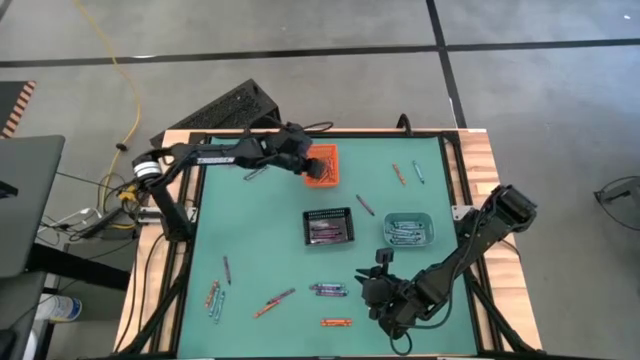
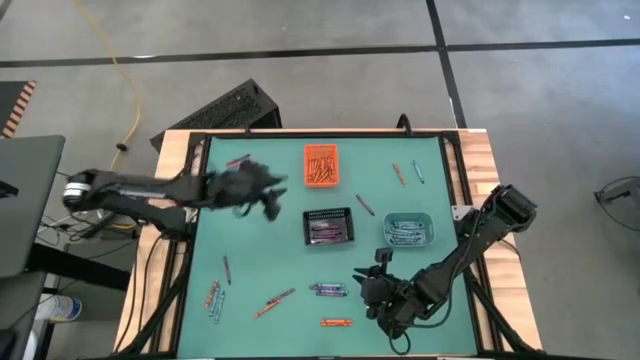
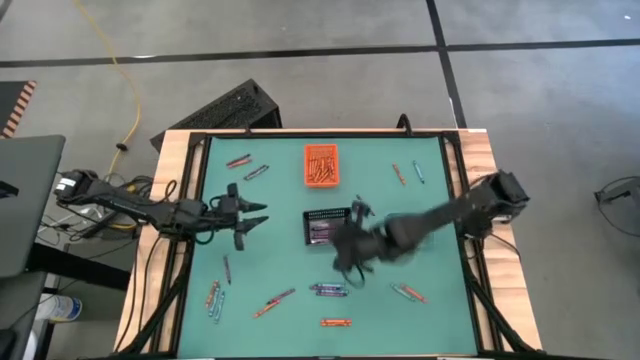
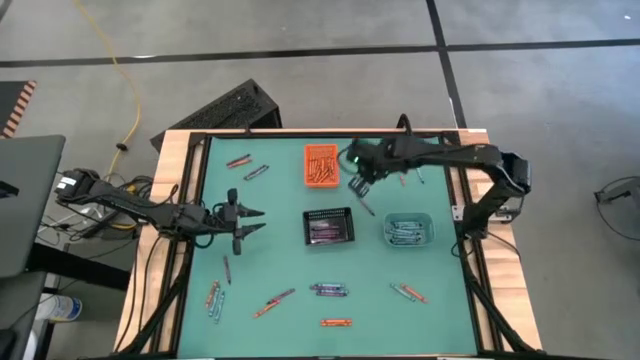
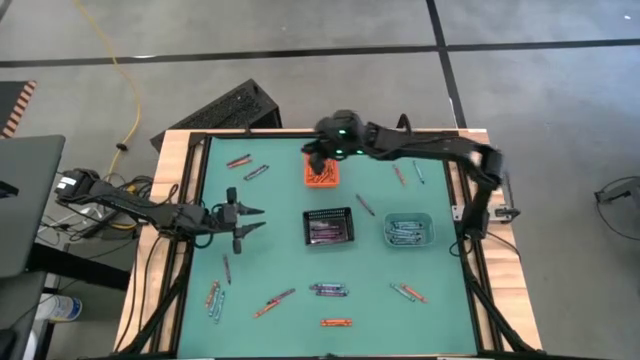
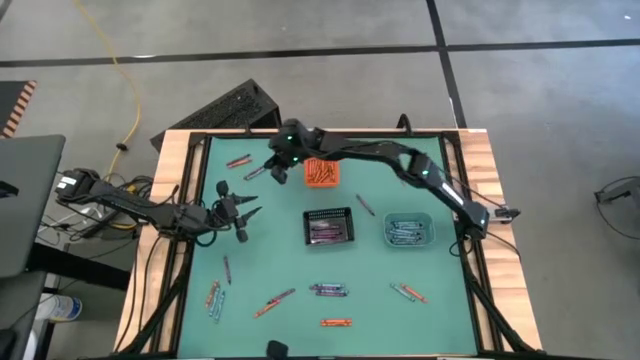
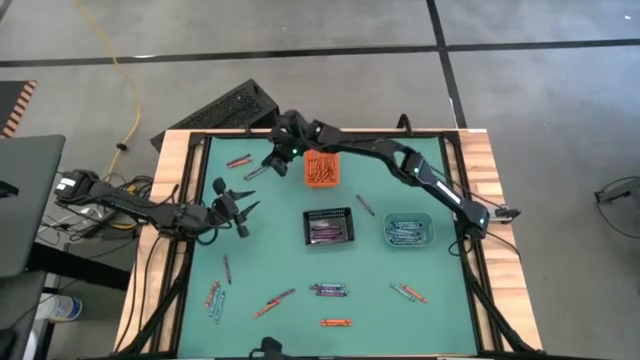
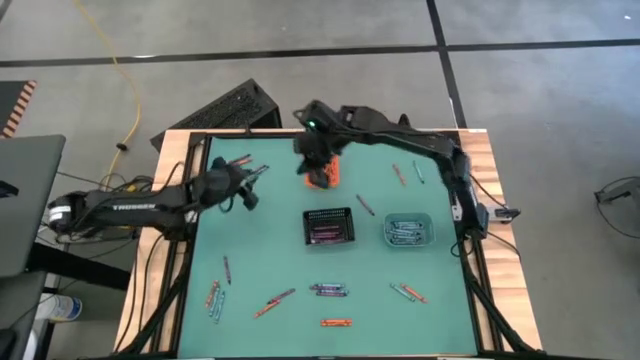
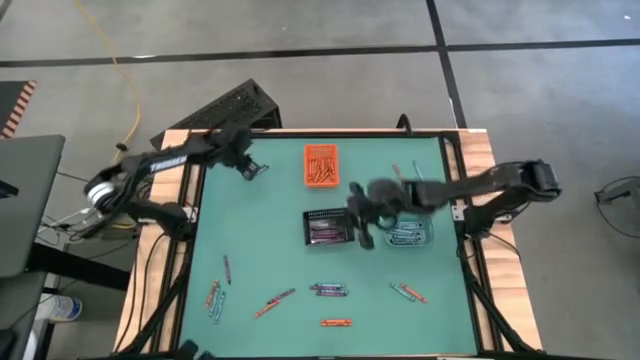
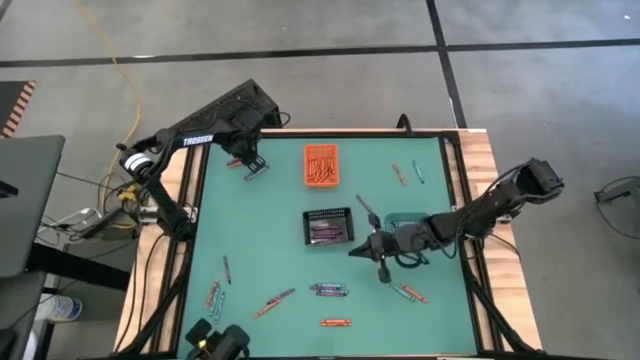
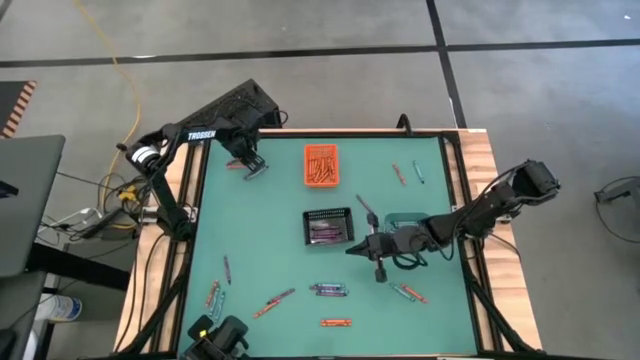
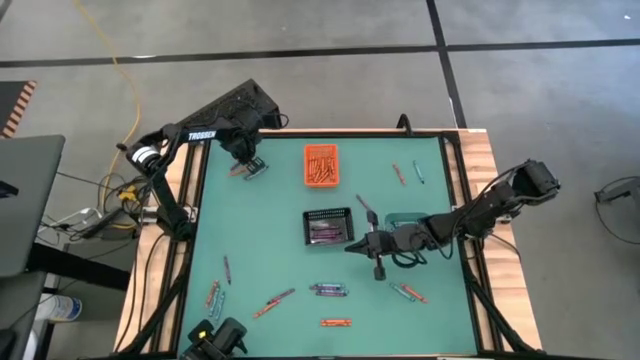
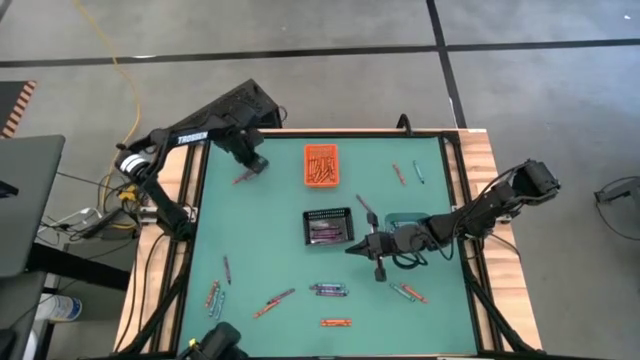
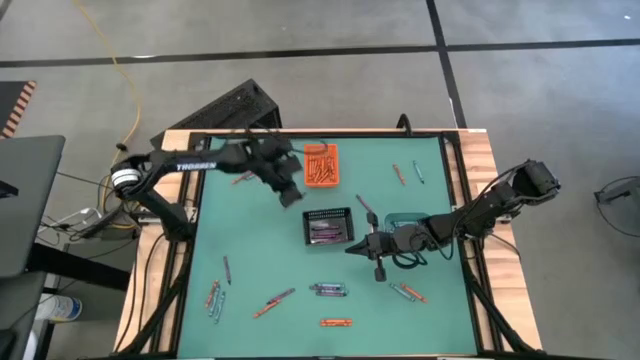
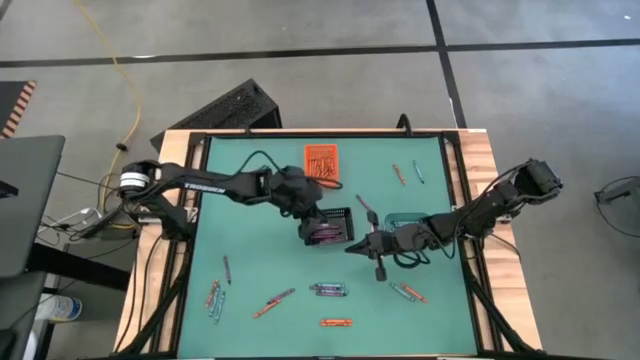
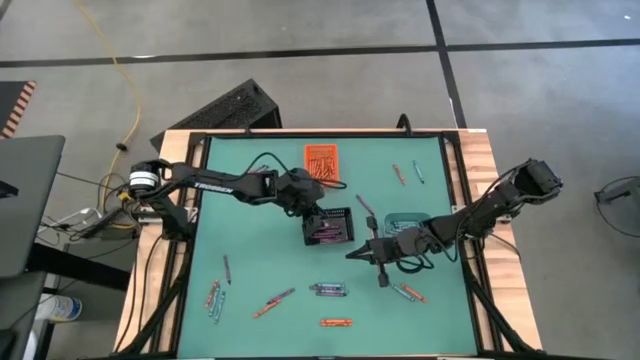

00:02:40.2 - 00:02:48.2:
Task: Sort crayons
Put the violet crayon into the black bin

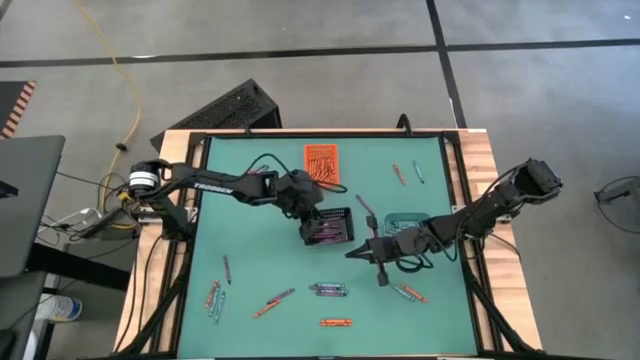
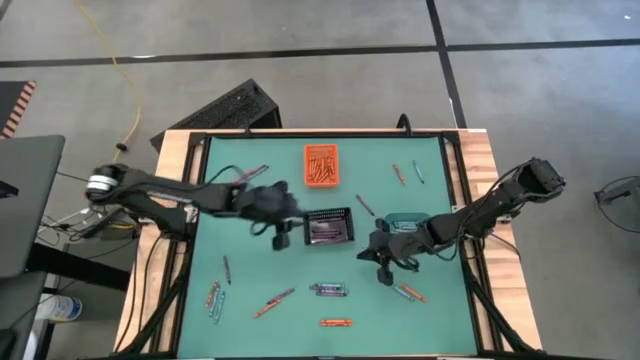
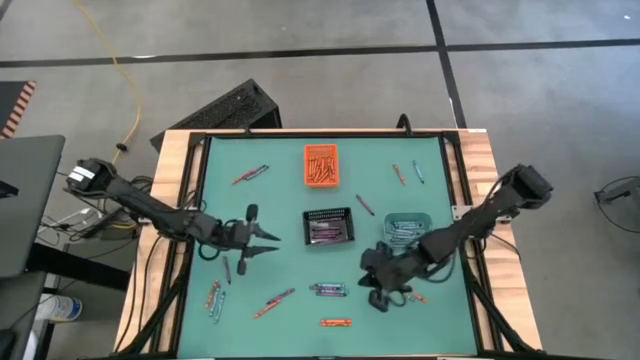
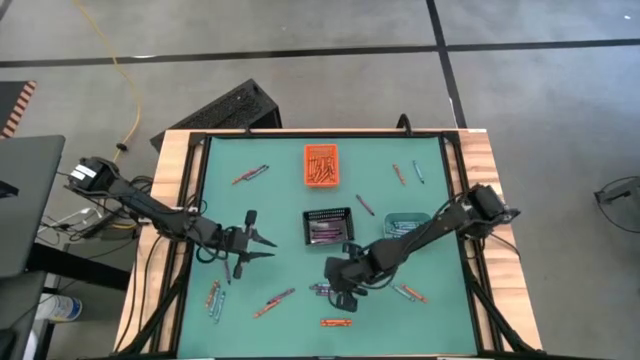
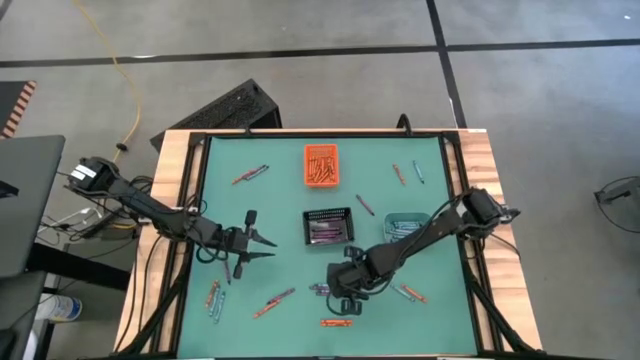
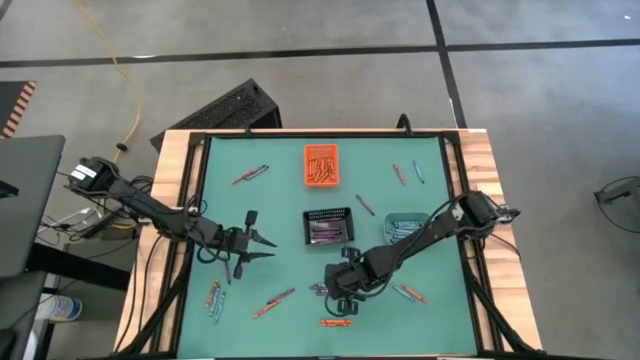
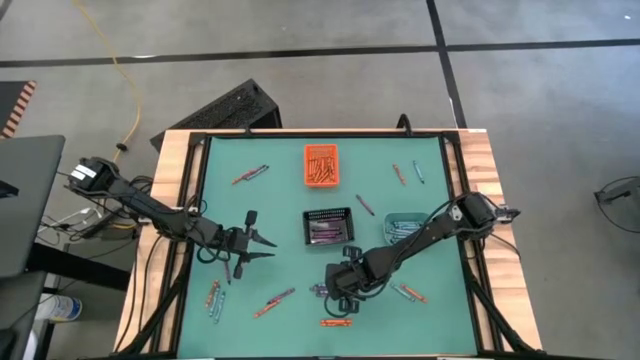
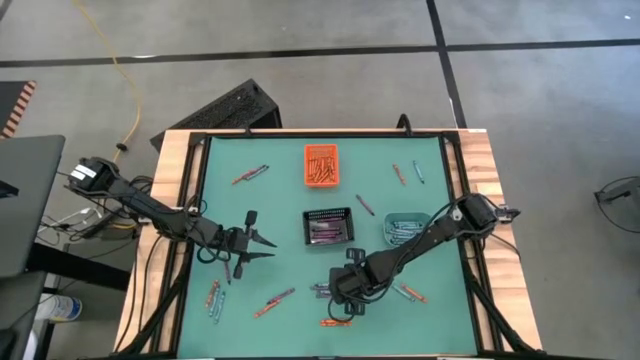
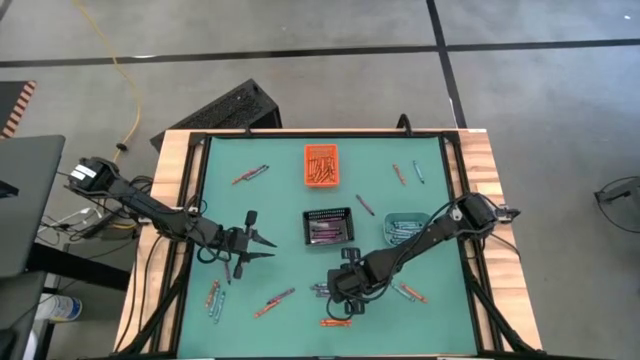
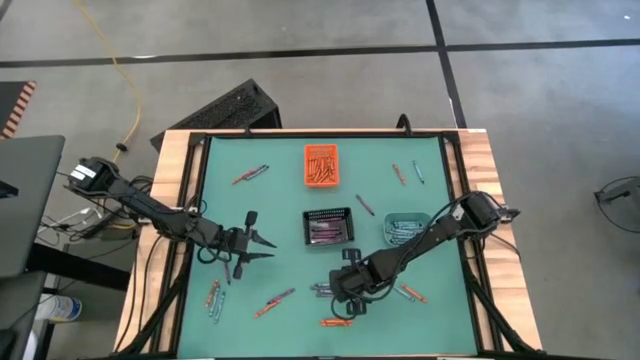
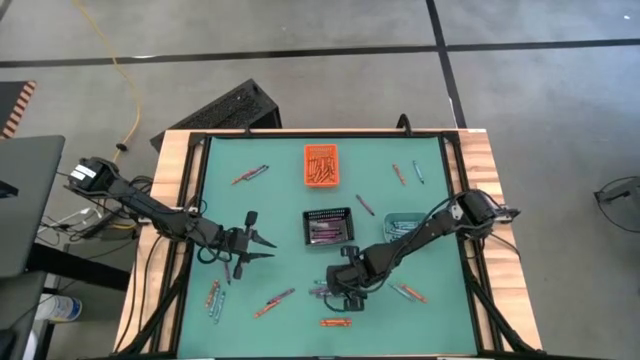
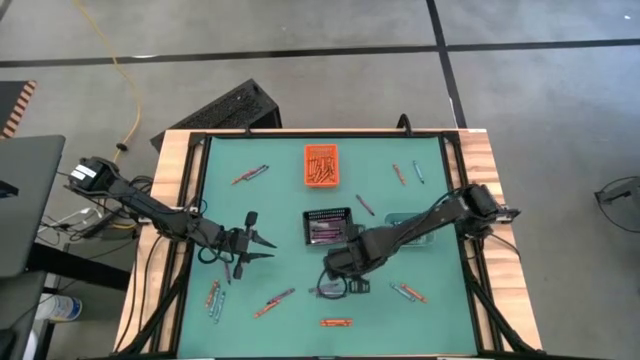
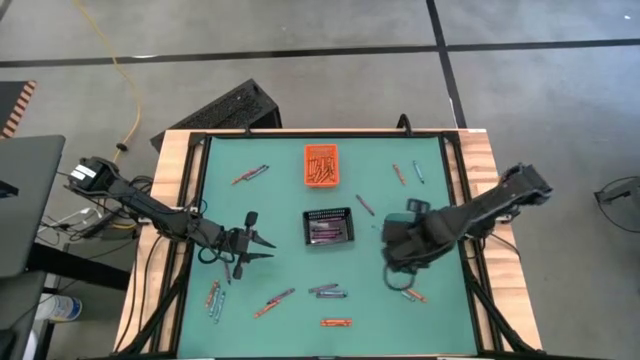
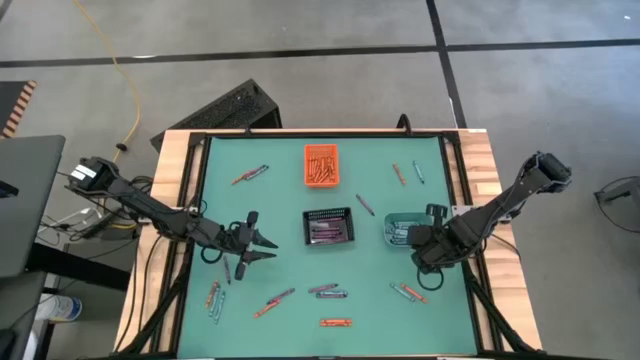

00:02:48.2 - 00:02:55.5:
Put the blue crayon into the green bin

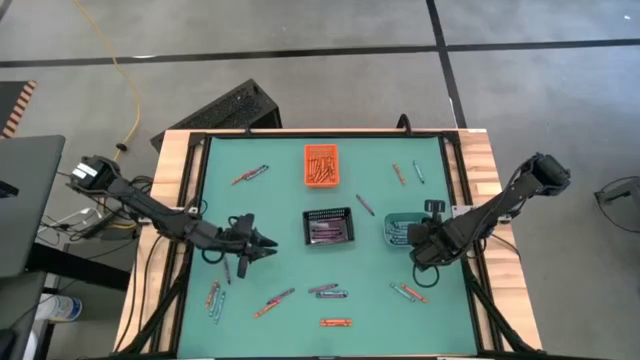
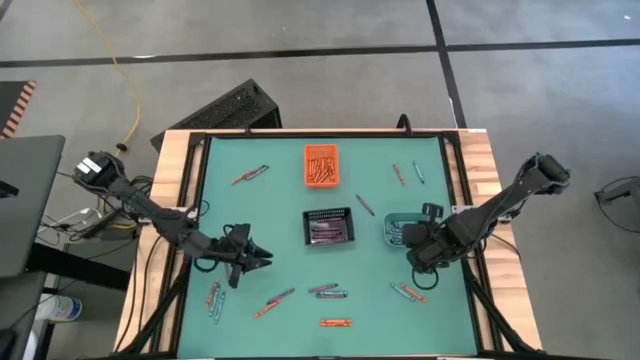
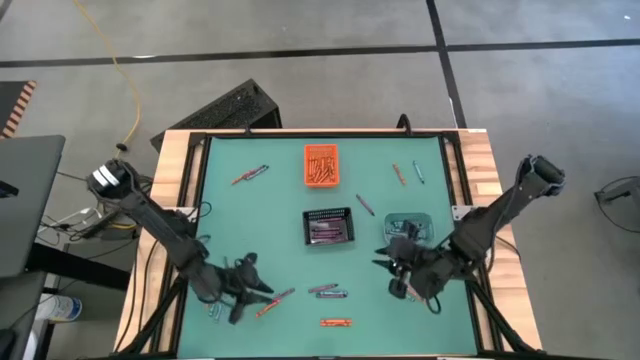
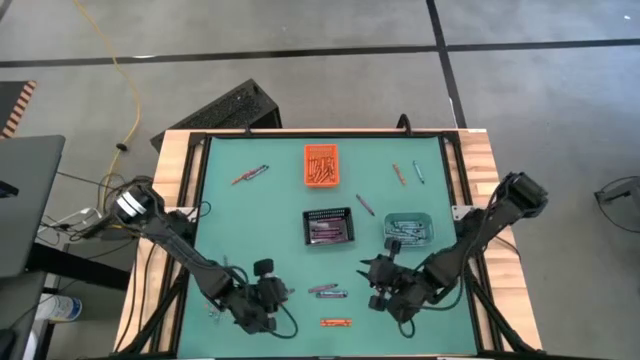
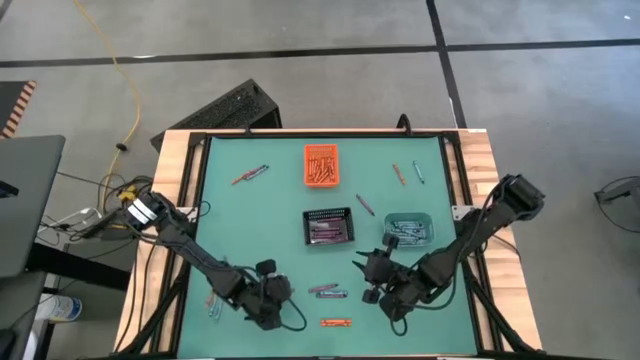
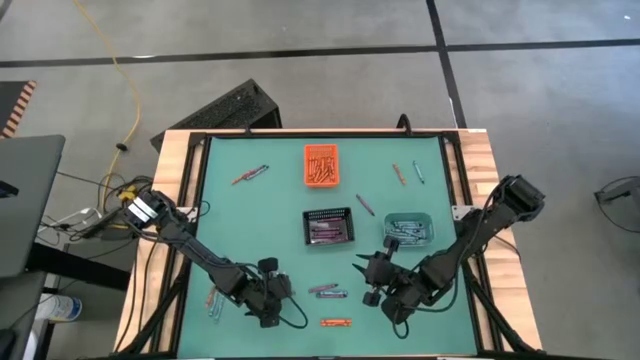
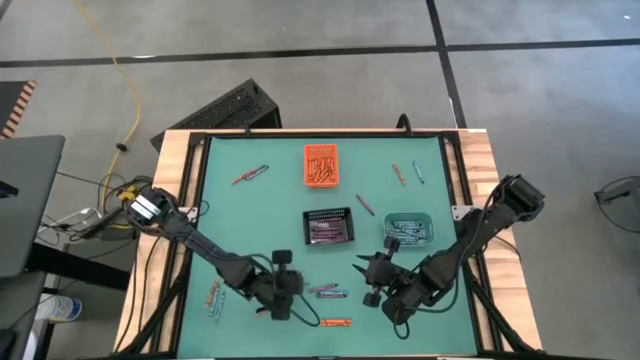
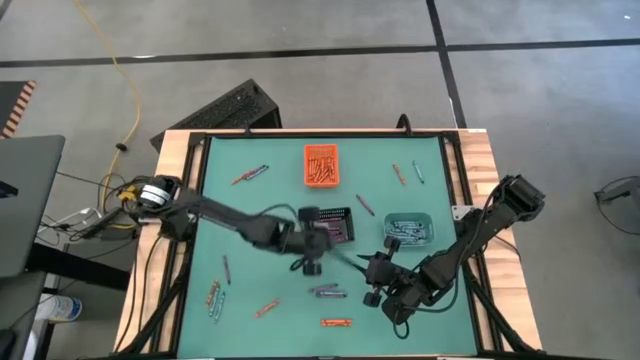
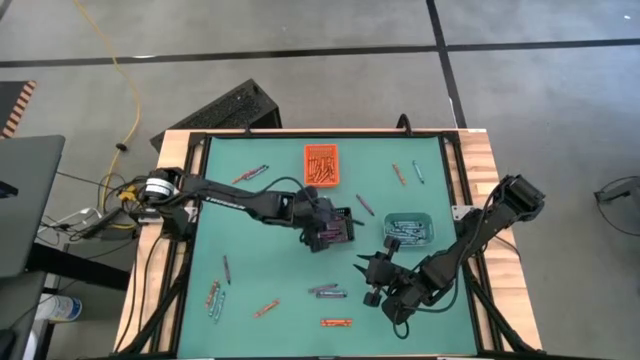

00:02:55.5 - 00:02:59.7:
Put the violet crayon into the black bin

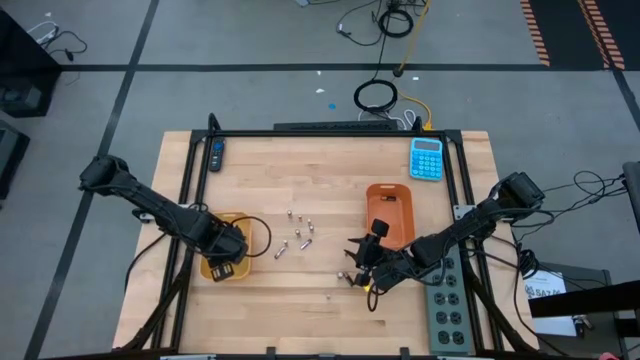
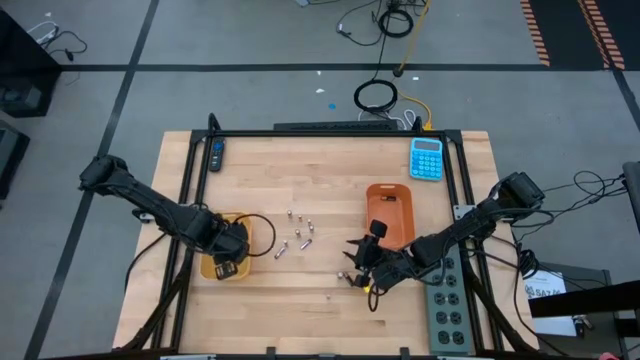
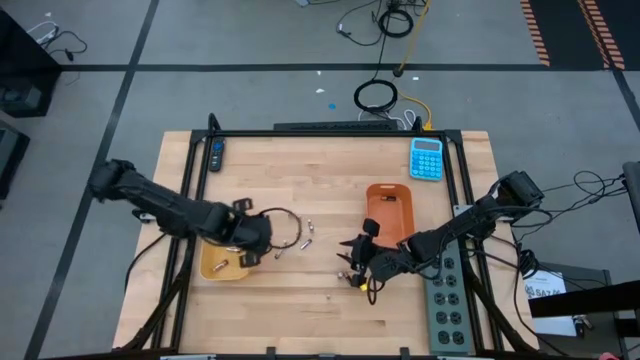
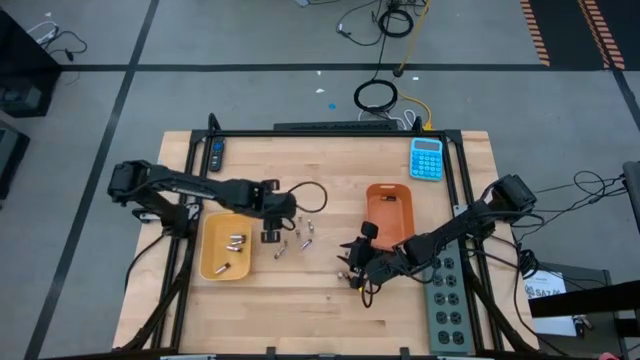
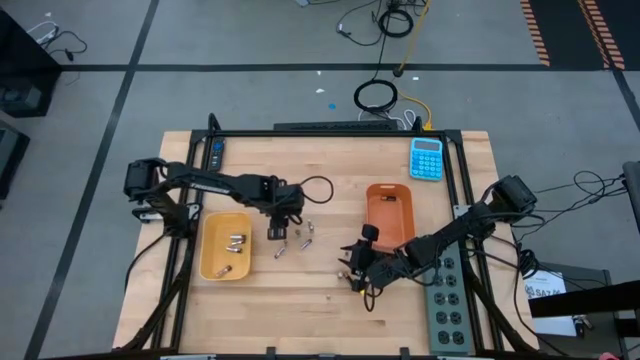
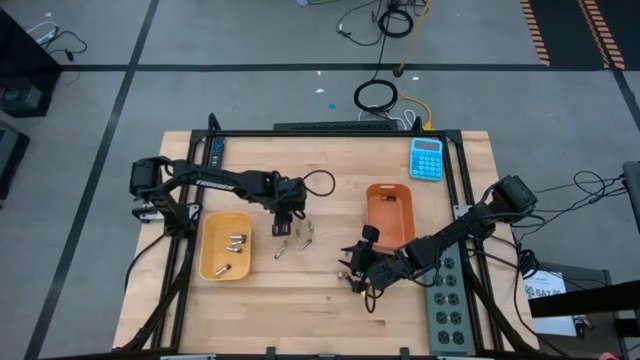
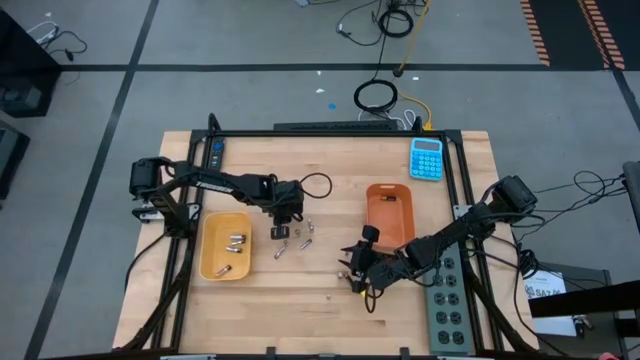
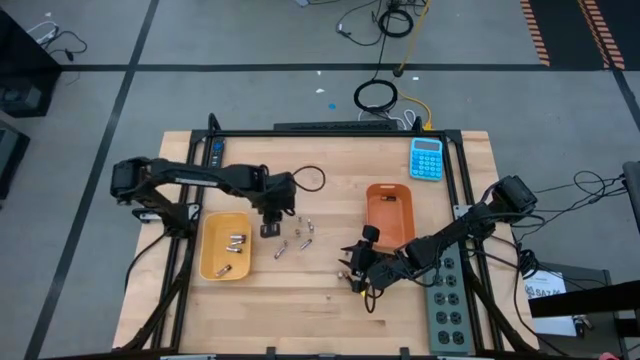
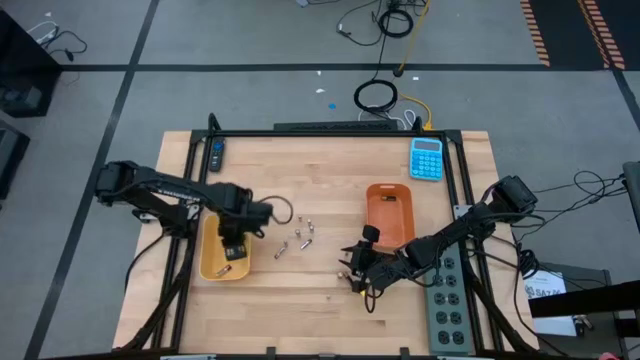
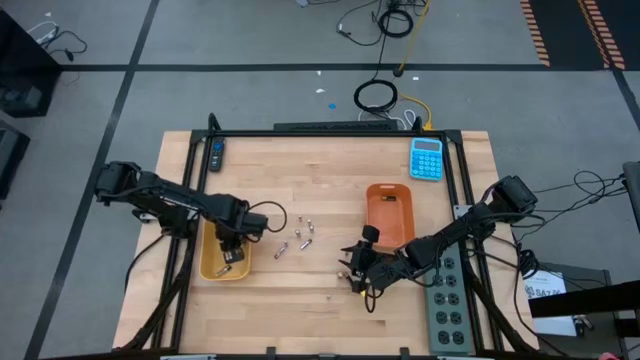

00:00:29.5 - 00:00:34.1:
Task: Sort batteries
Put the silver battery into the yellow bin
